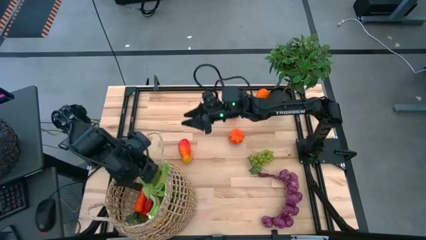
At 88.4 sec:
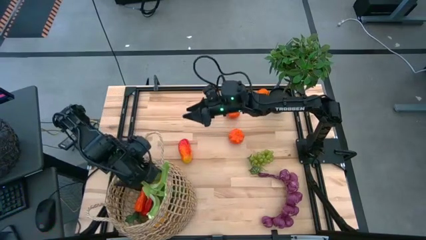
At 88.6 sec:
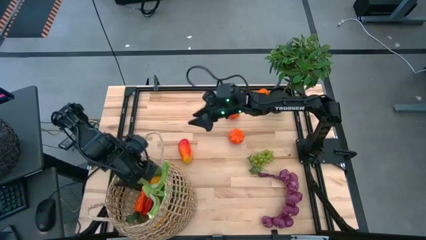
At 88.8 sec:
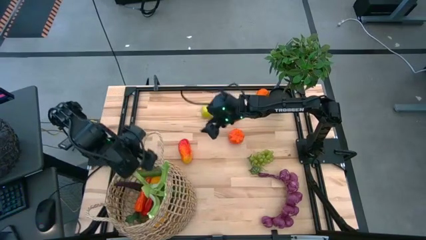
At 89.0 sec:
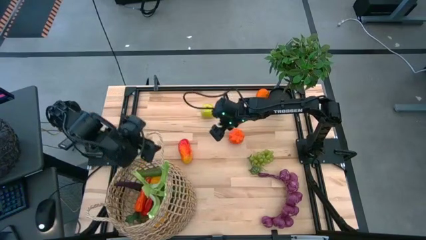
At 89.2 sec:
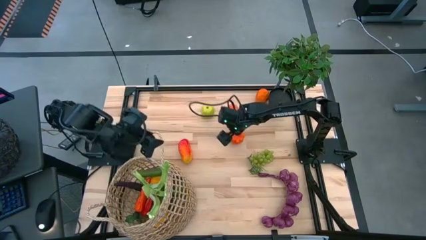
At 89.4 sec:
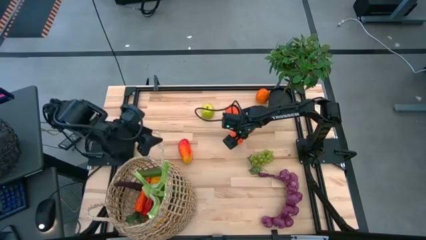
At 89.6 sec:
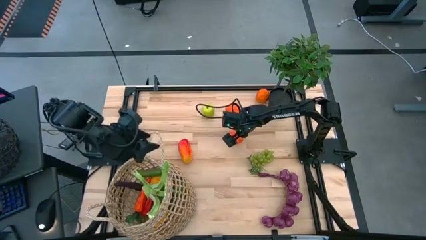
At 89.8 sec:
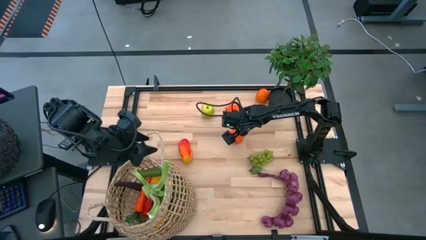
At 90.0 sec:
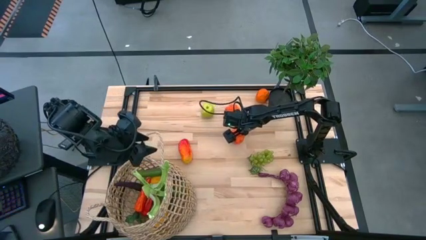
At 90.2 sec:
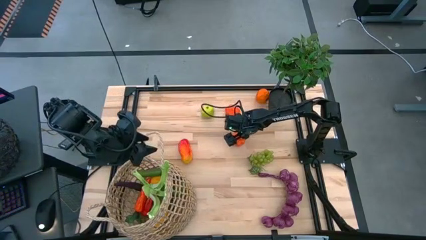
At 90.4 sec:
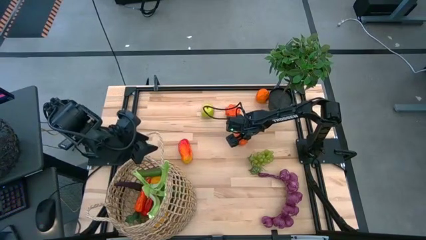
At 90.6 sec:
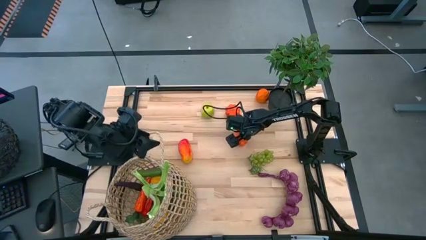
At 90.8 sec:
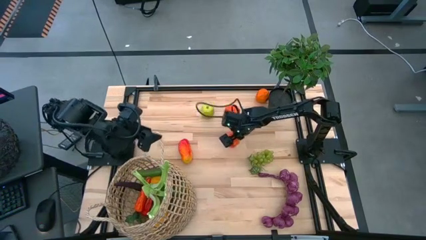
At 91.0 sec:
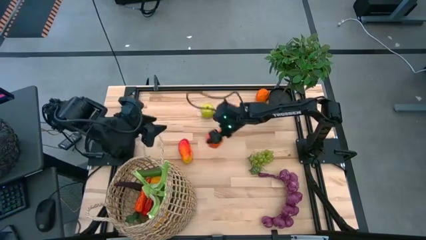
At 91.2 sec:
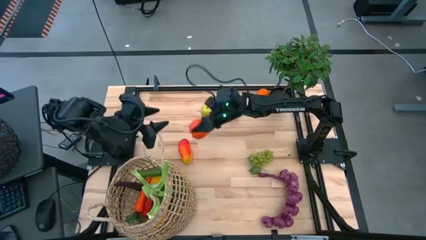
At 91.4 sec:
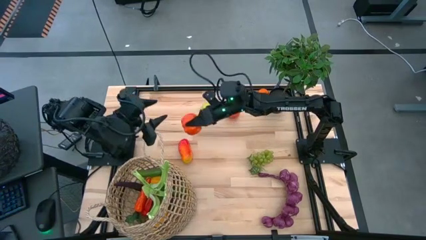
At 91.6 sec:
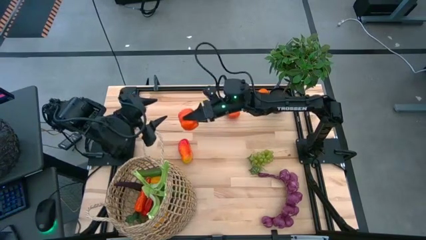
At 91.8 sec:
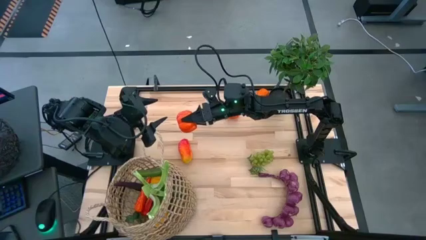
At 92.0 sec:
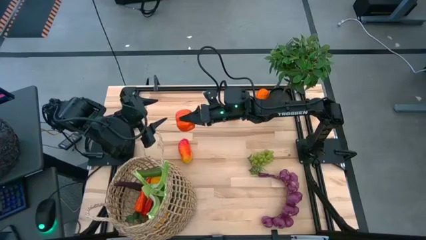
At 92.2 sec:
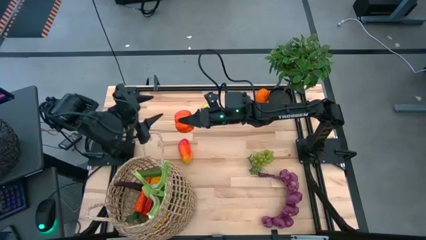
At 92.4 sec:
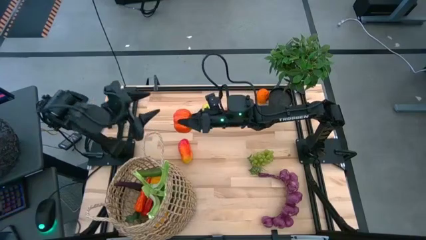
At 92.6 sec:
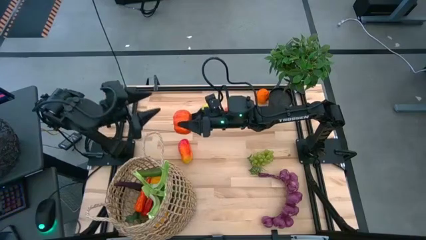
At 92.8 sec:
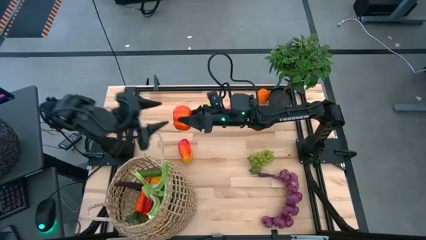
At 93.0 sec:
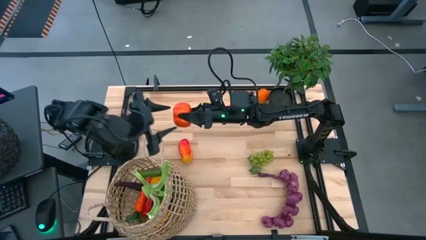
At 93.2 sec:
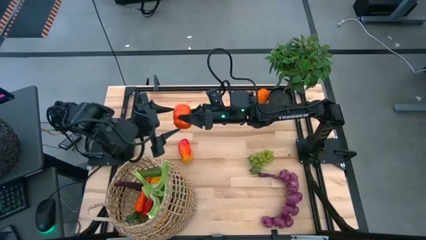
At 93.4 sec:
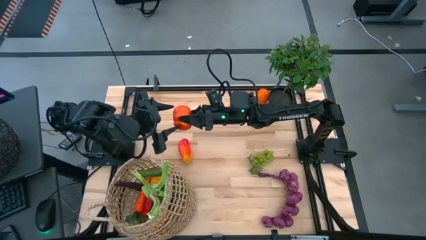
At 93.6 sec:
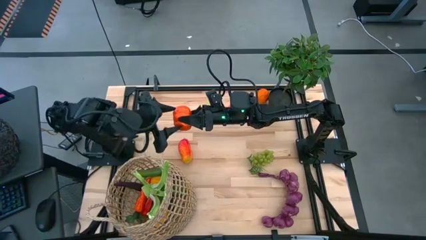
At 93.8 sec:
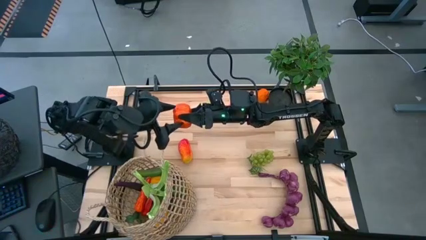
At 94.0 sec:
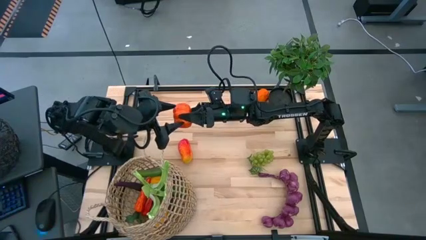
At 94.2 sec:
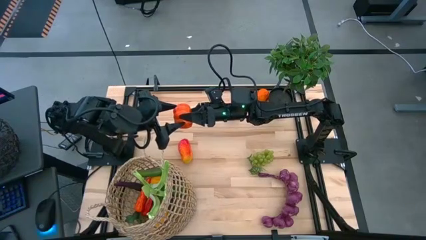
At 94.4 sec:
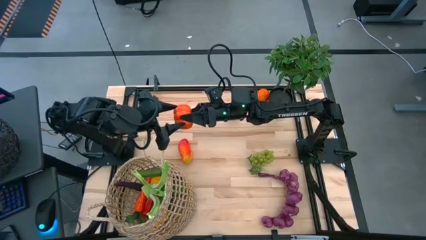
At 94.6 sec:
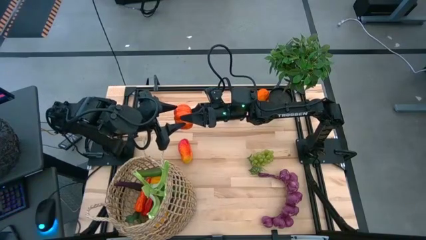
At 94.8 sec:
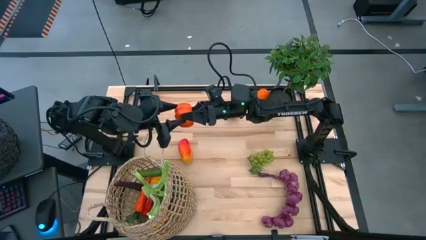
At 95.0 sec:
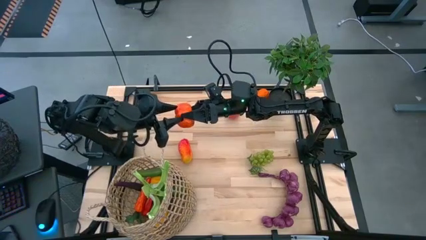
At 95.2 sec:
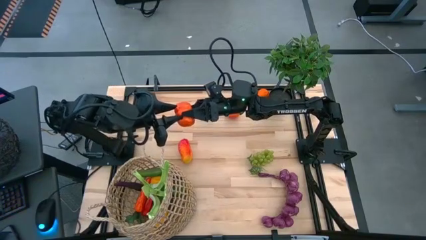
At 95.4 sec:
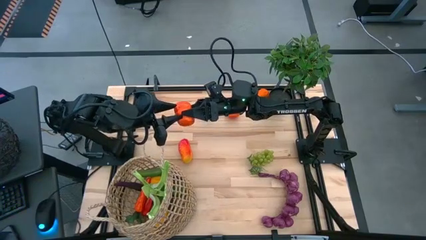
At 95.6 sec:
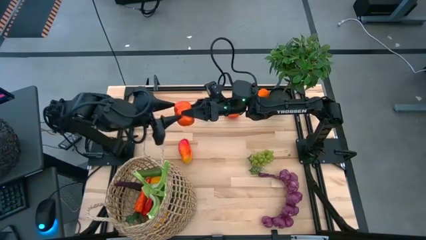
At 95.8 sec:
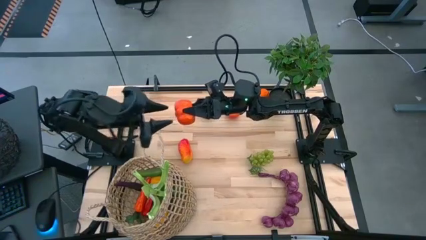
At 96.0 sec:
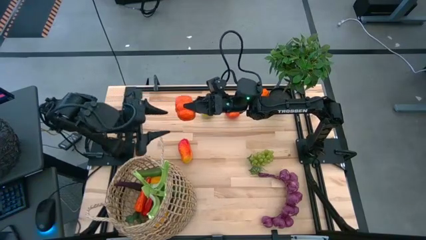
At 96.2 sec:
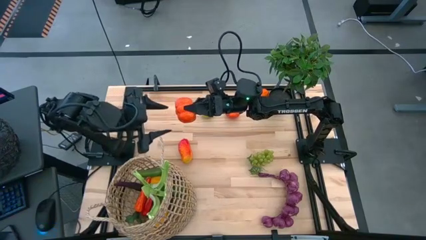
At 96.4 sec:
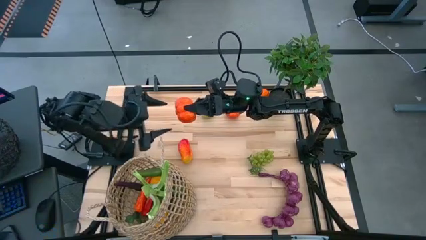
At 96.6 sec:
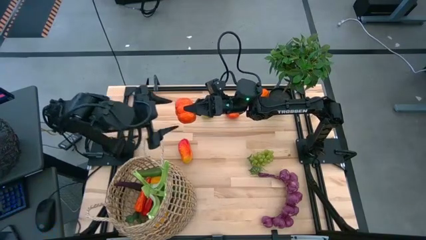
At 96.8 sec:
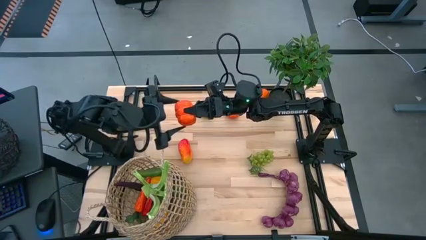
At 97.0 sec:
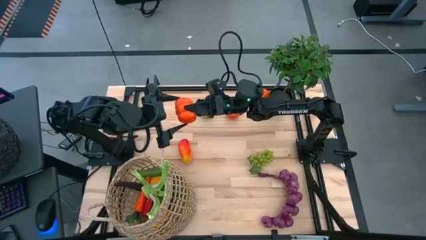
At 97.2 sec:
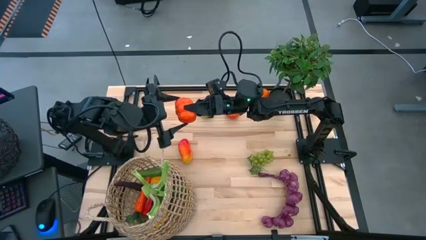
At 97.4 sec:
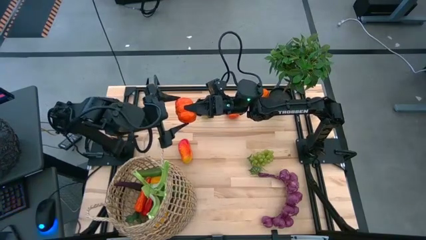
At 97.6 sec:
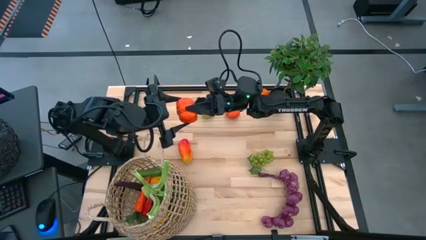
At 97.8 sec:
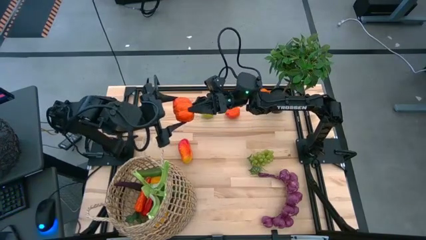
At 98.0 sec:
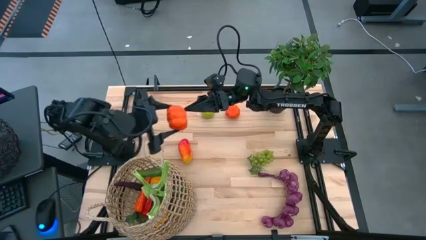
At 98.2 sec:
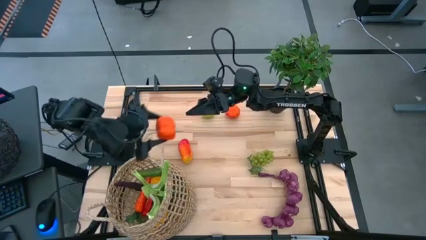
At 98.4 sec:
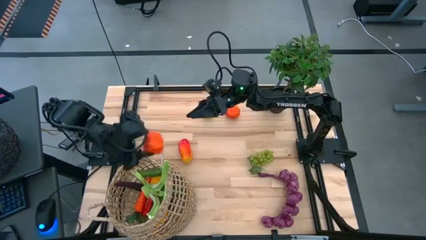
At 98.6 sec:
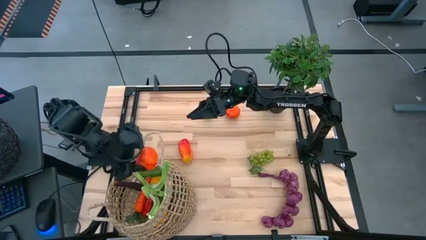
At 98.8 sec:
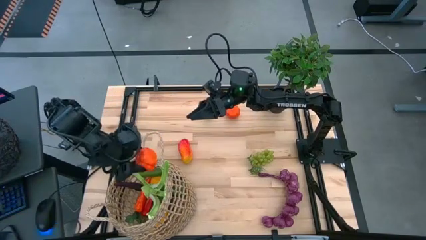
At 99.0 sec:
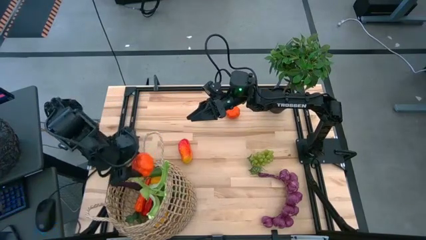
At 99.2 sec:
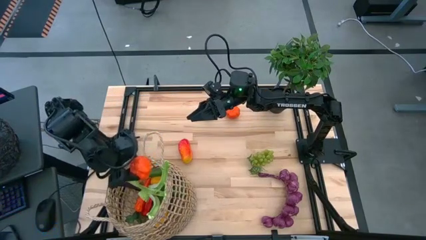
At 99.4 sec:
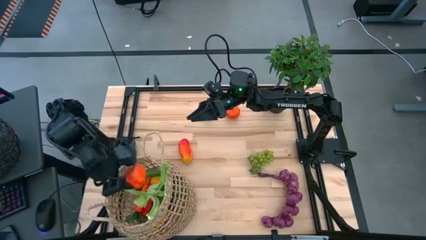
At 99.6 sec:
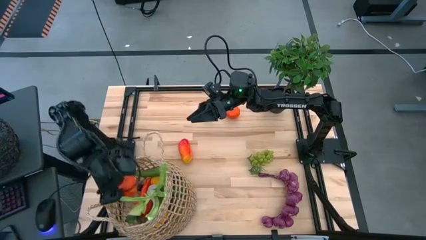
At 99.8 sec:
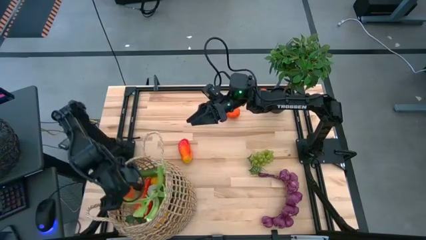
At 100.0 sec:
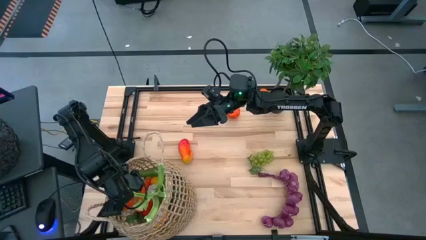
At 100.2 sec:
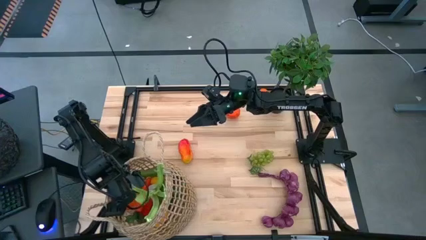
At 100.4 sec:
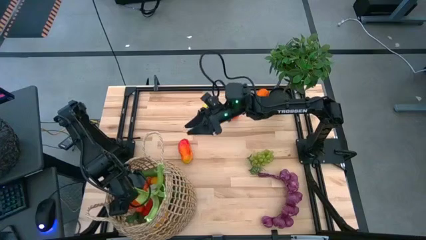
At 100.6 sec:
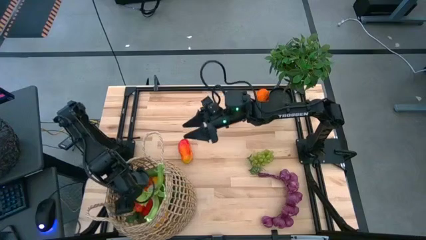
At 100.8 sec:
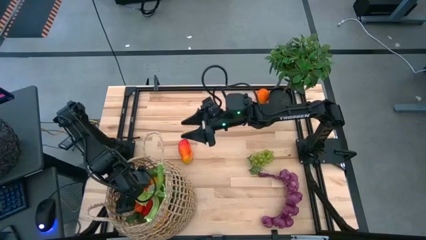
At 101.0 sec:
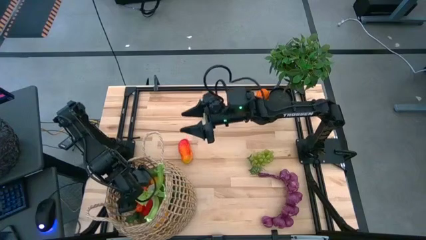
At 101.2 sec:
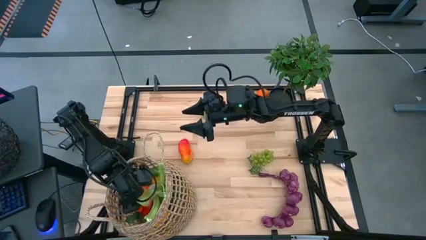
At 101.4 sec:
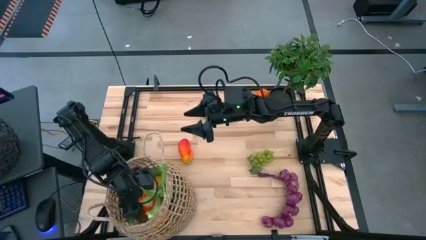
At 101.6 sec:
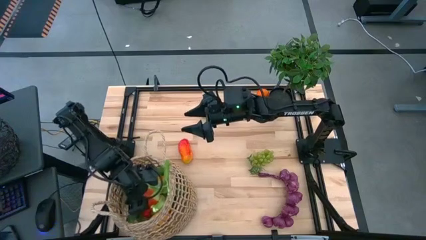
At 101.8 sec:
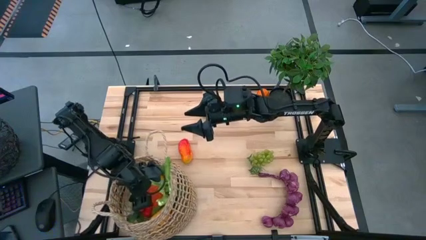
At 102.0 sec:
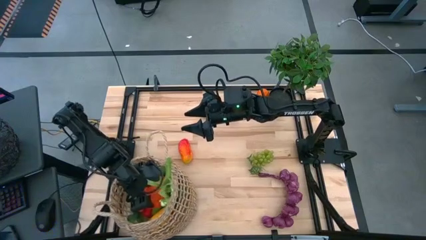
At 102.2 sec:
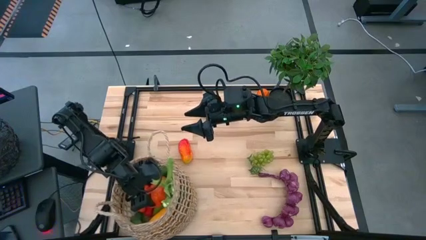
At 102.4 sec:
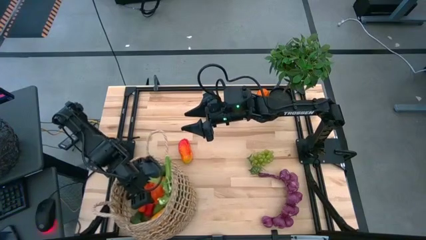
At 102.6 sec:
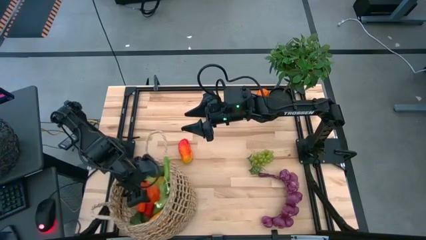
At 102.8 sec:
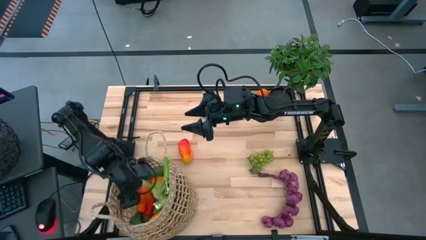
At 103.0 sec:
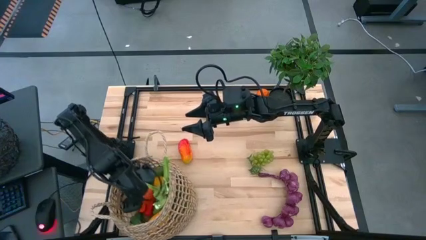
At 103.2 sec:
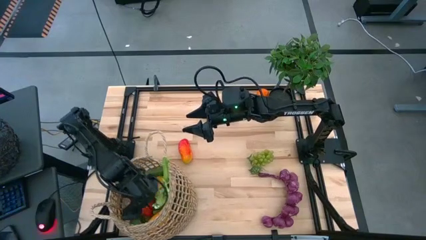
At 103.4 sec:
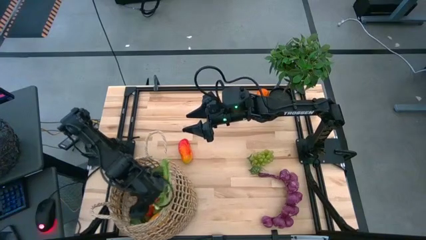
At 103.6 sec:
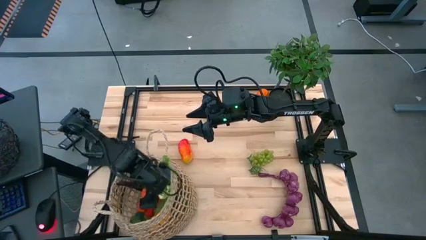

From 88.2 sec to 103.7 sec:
Task: Build produce basket
Put the bottom pumpkin into the basket

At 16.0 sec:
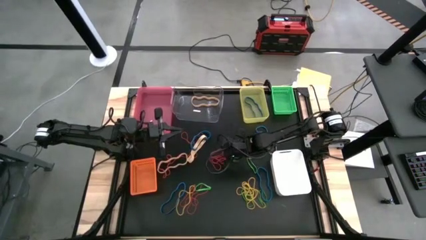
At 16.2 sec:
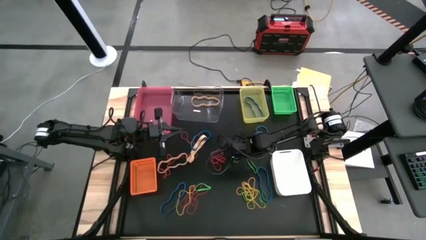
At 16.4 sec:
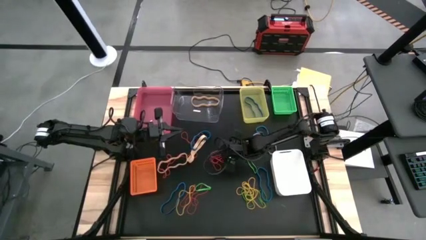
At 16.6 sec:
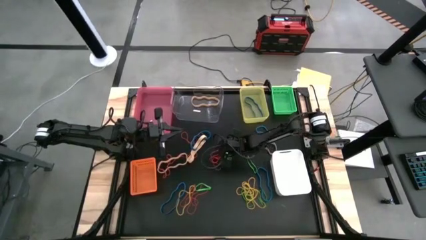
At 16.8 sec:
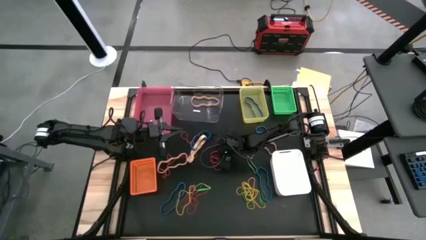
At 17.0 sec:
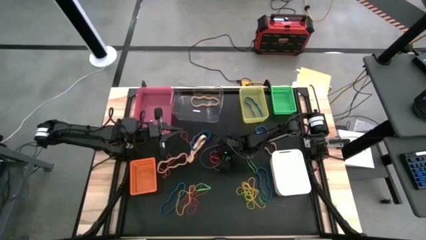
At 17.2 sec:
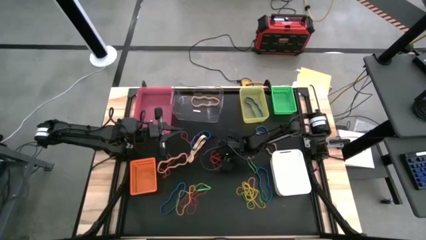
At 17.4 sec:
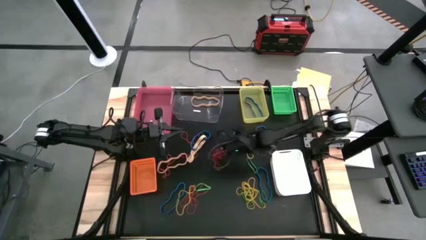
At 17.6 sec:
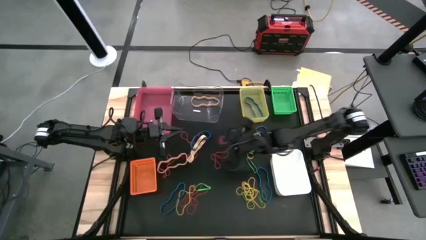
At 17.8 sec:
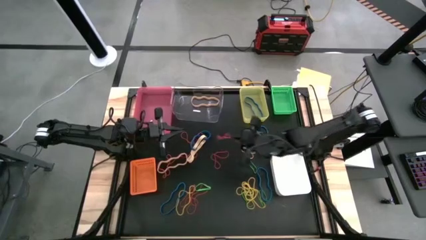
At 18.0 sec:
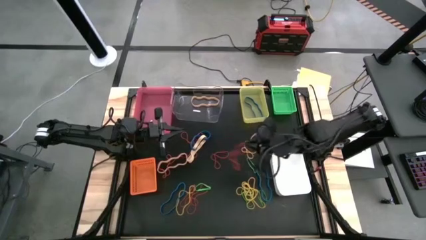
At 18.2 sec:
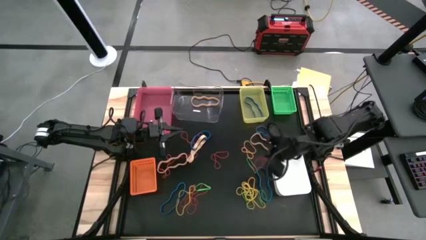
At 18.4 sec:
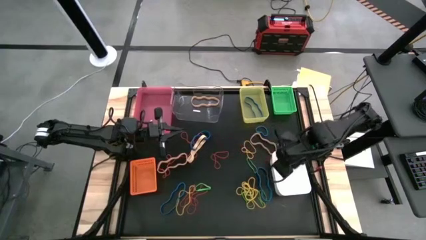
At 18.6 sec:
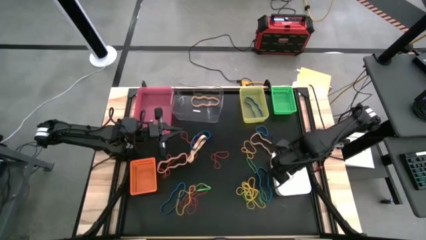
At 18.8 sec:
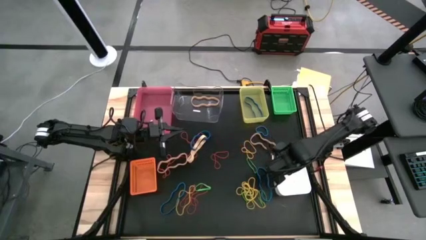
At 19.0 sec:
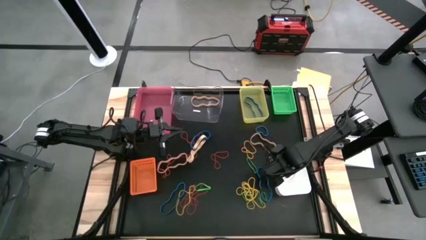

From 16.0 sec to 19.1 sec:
Task: Sort rubber bands into baskets
Put the red rubber band into the white bin
